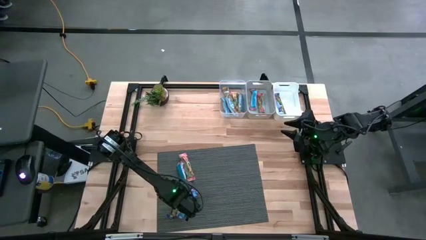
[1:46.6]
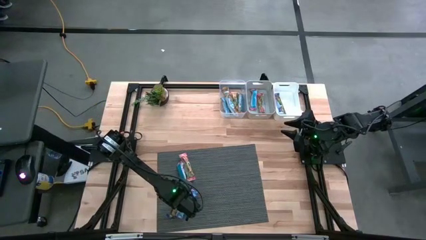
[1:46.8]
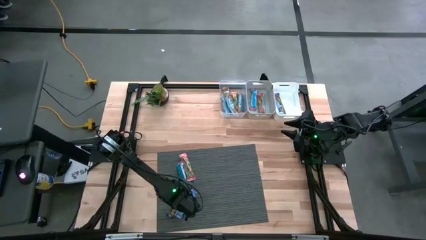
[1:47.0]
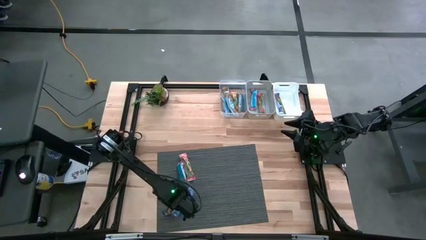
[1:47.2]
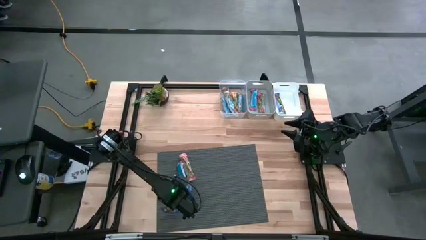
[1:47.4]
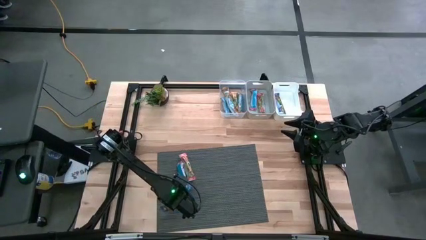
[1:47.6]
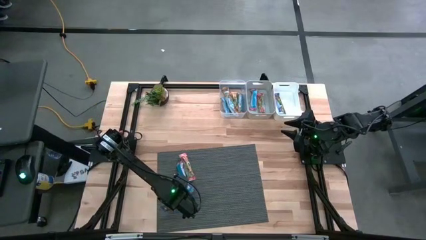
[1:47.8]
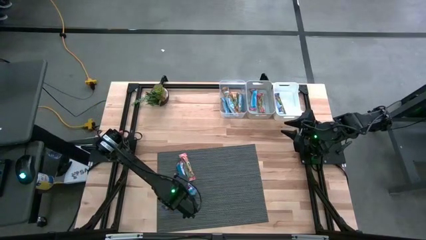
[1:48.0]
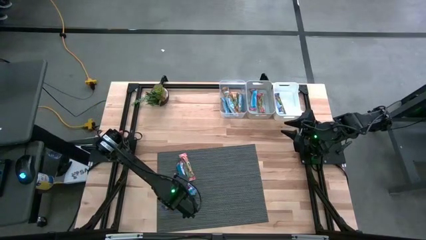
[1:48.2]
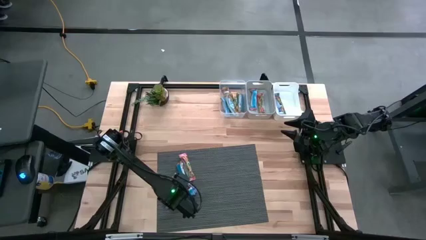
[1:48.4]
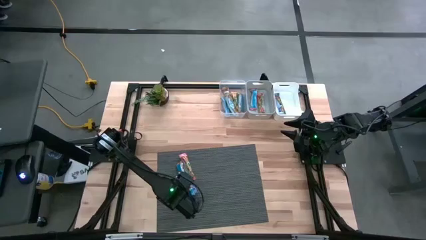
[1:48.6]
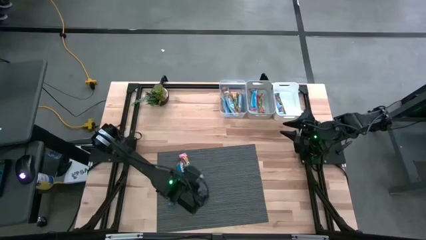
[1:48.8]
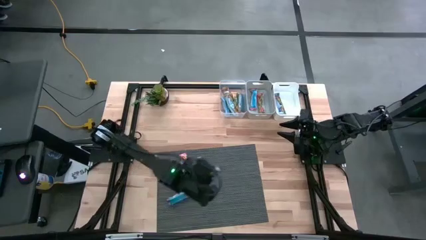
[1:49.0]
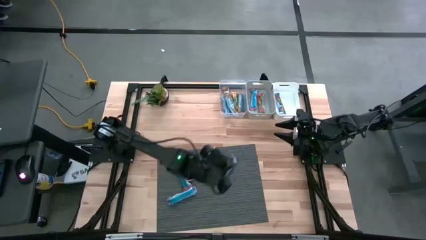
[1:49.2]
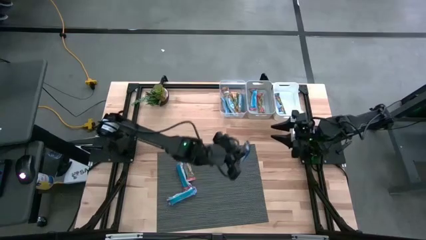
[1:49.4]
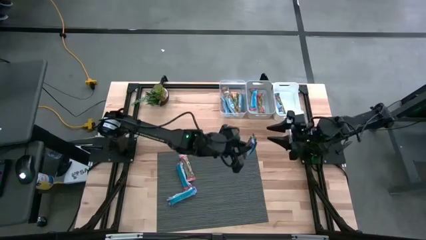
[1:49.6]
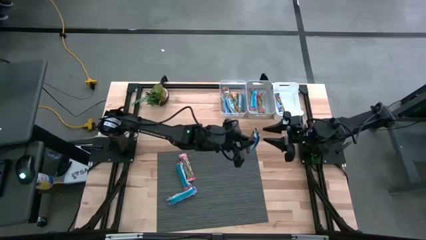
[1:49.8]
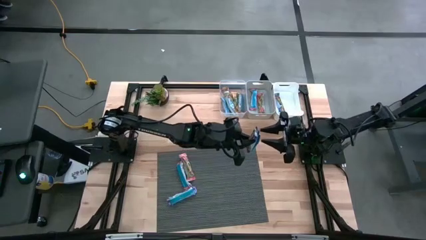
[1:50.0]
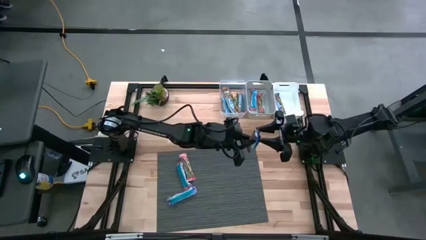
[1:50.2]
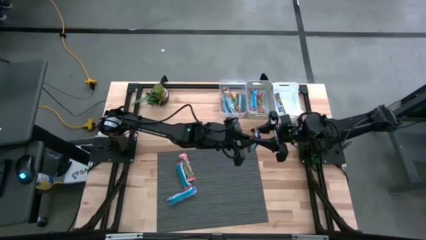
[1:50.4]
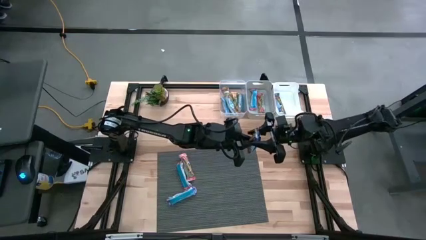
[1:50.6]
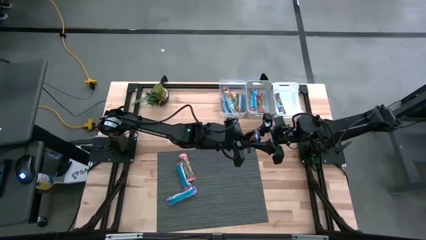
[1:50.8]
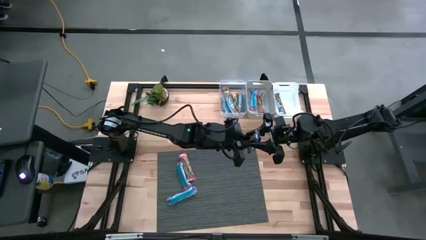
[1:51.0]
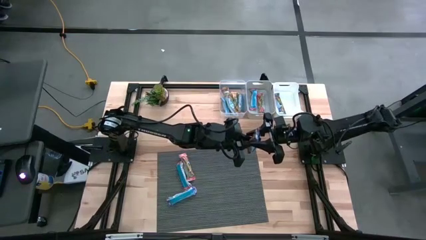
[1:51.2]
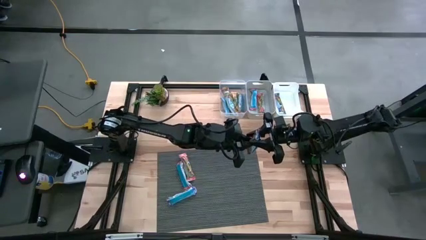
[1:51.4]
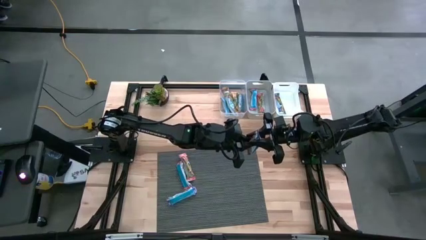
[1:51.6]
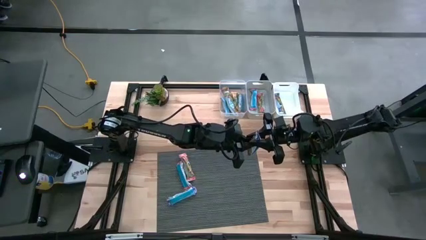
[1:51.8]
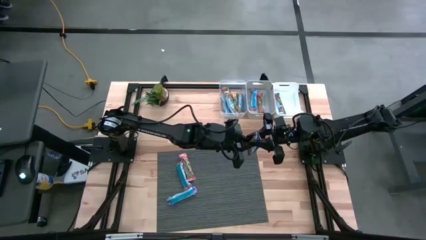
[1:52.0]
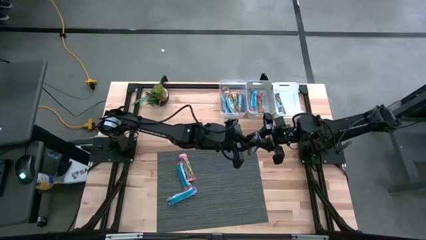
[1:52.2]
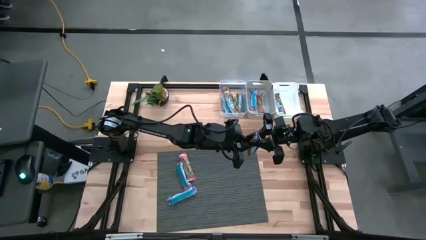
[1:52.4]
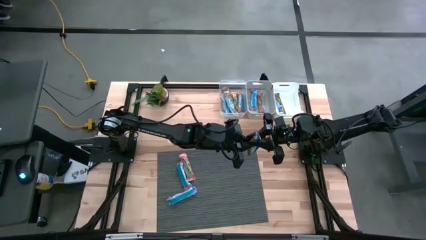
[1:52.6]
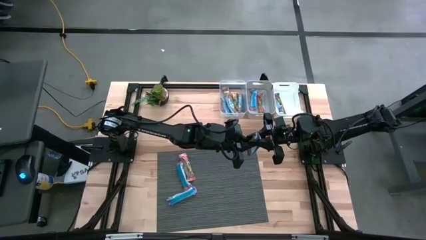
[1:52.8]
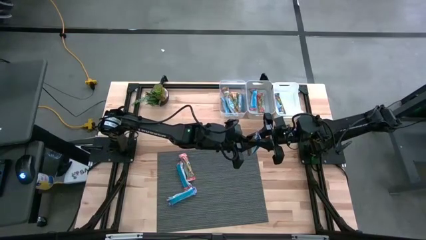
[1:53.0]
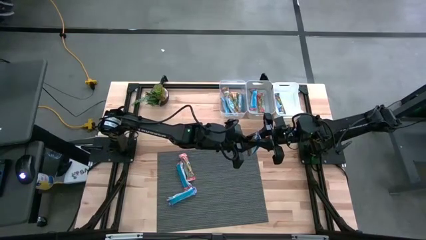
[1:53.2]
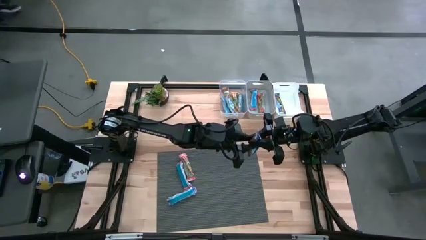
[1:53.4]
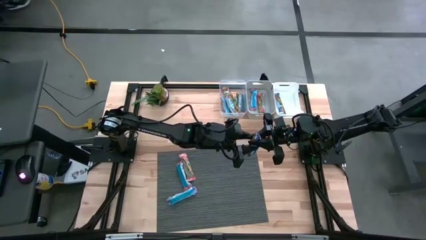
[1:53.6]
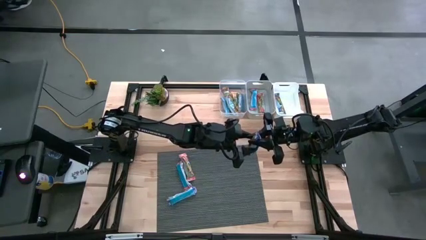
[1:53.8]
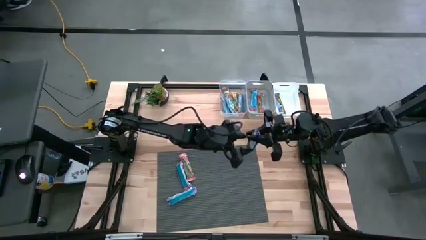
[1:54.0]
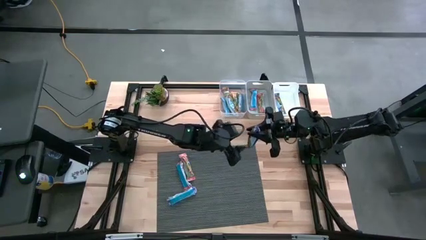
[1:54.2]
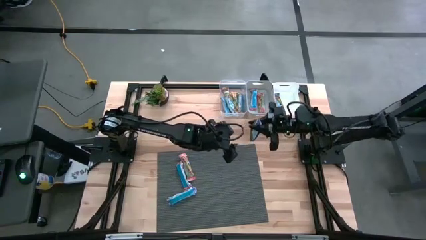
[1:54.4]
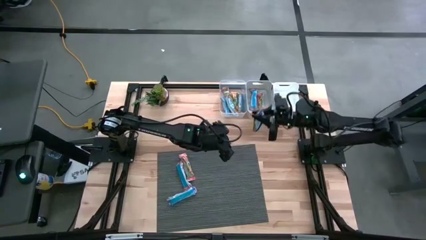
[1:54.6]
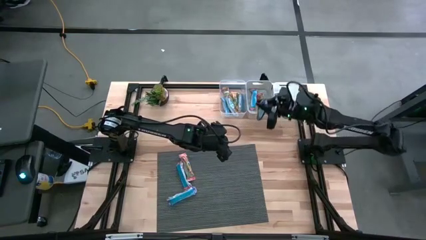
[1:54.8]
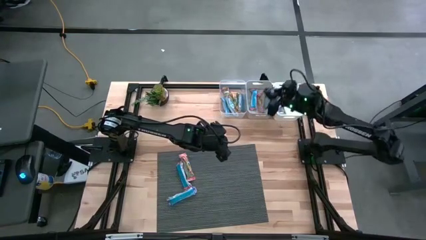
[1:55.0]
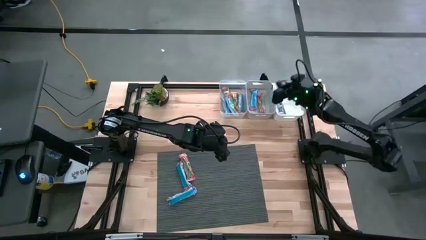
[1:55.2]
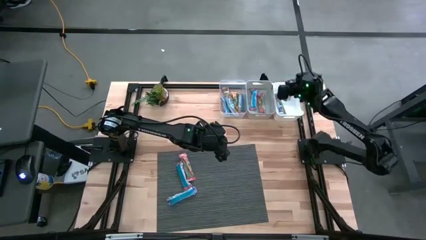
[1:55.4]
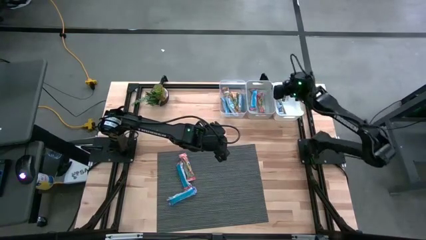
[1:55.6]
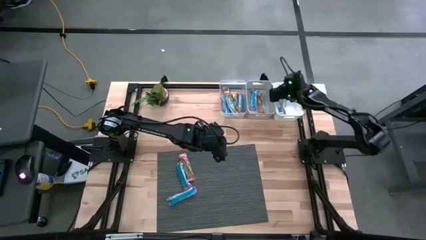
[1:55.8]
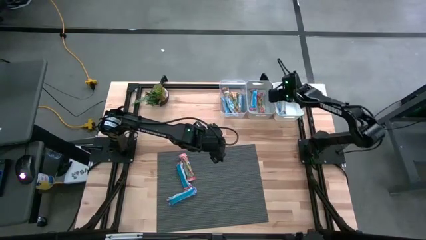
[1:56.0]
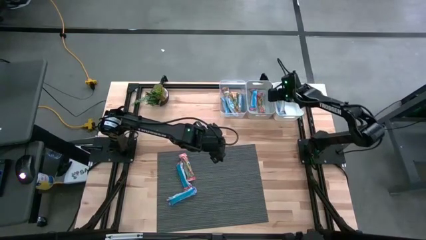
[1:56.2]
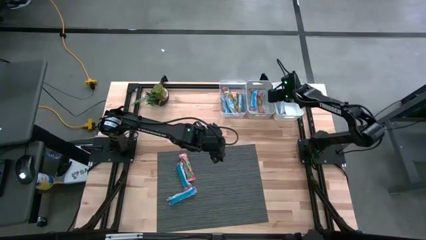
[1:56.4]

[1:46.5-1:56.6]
Task: Pick and place Granola Bars by type
Put the blue granola bar into the white bin

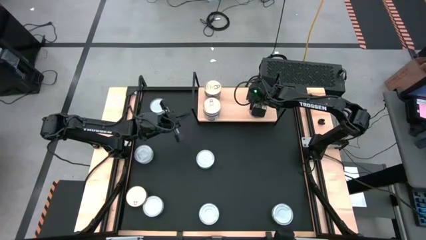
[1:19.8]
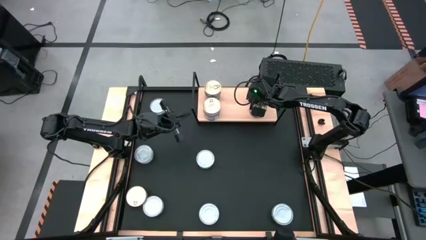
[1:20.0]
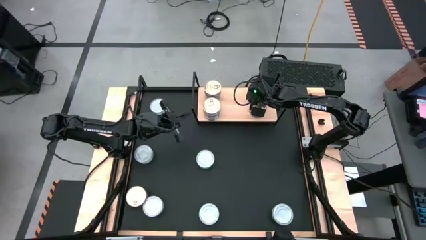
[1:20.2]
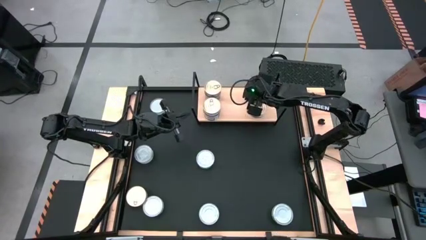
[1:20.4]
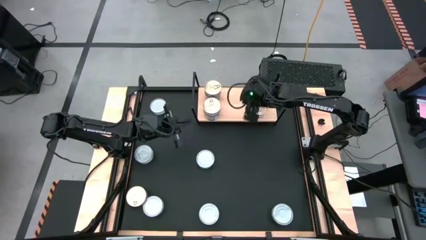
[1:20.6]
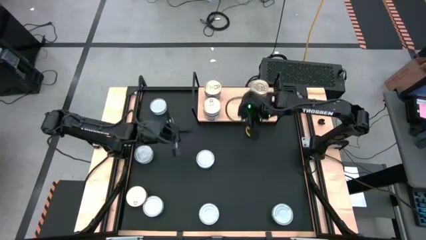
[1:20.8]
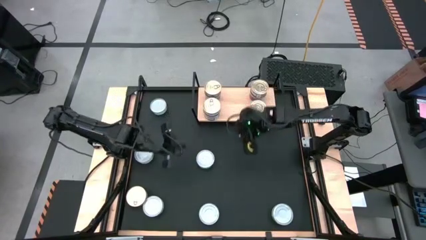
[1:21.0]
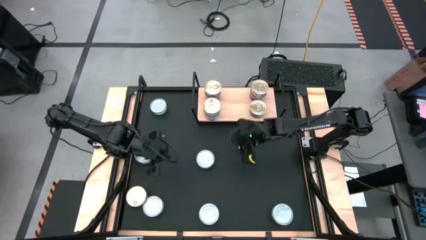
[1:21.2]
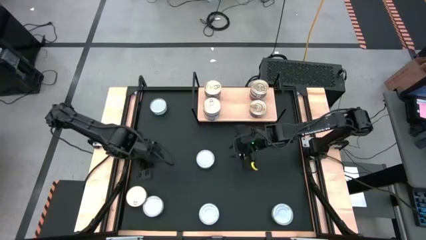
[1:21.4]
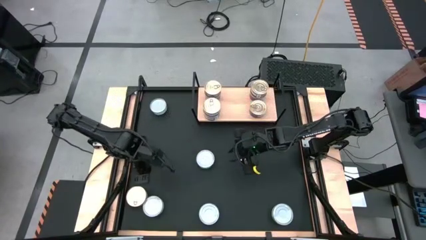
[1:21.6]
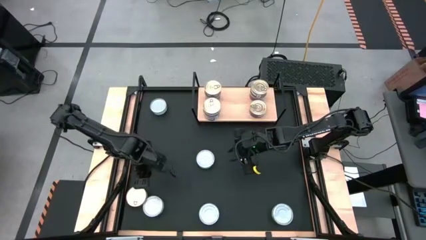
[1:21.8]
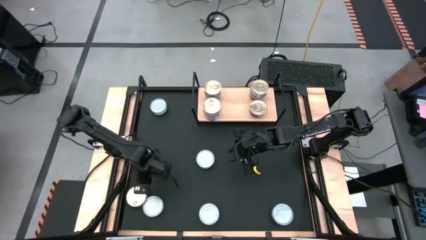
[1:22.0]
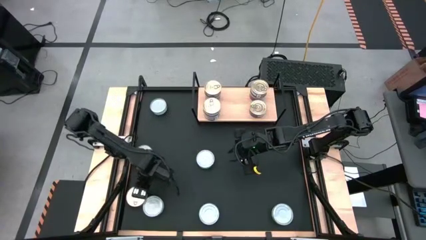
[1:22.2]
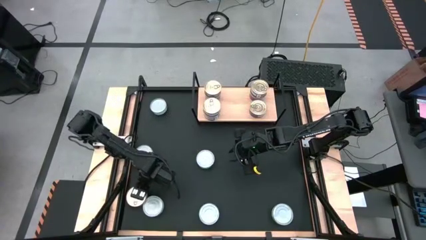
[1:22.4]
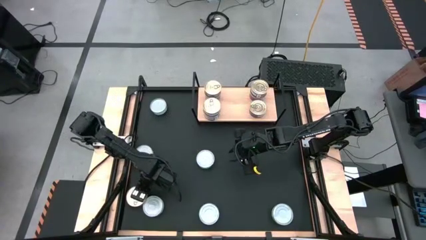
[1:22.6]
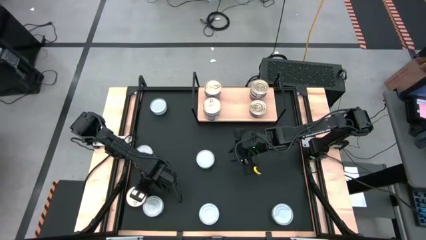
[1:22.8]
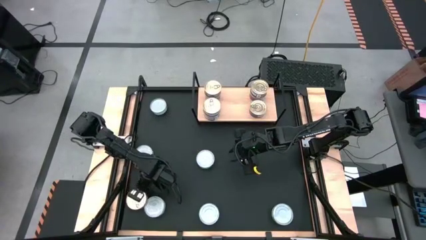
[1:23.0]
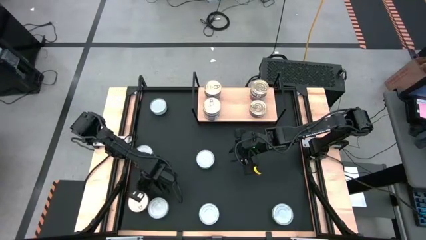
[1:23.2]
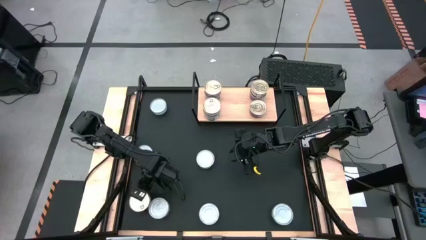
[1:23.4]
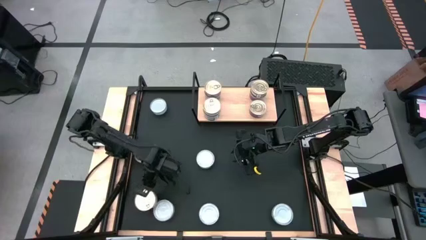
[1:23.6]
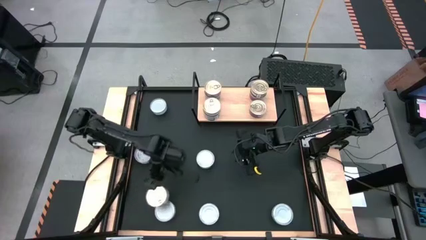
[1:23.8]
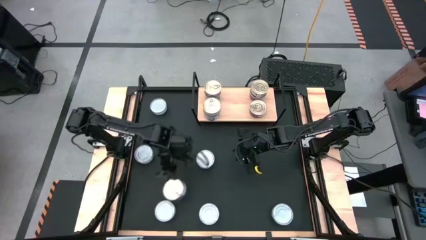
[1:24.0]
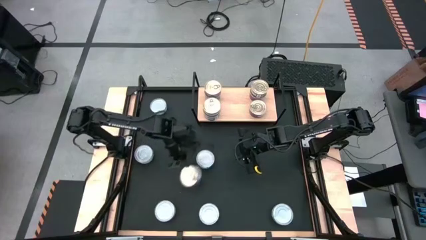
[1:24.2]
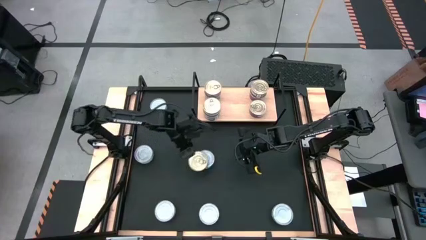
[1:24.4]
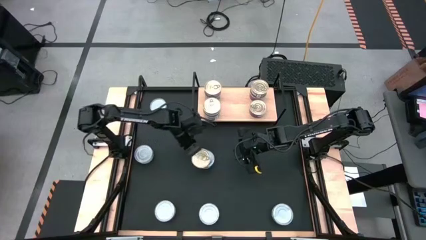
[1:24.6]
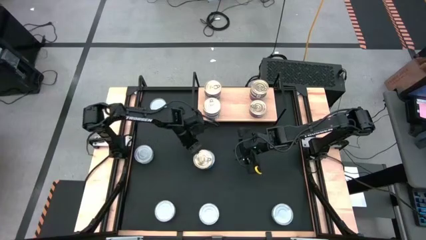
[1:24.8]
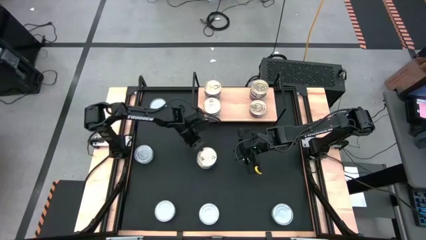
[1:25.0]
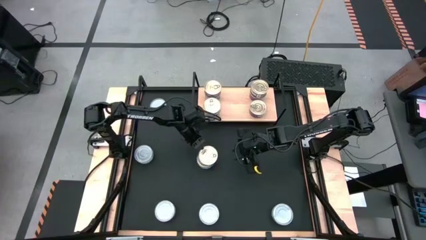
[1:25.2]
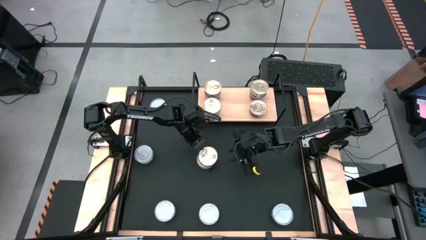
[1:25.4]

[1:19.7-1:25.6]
Task: Stack canned seafood by type on shelf
Stack the blue pink tuna can on top of the other blue pink tuna can on the shelf

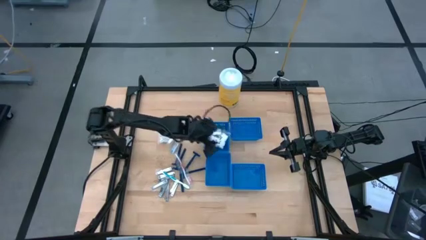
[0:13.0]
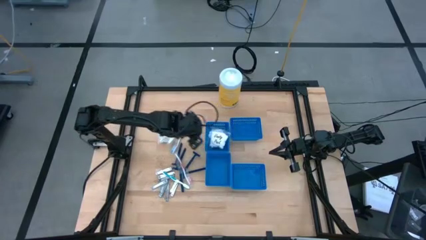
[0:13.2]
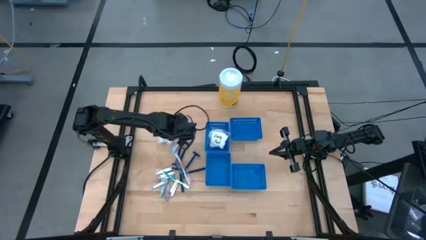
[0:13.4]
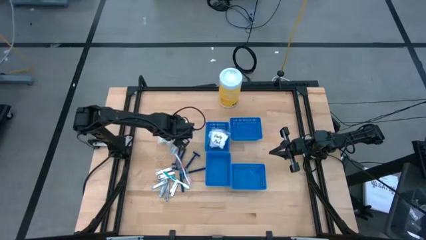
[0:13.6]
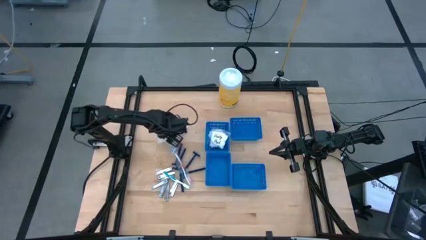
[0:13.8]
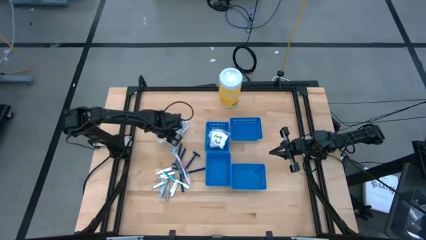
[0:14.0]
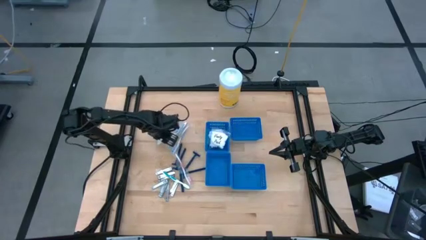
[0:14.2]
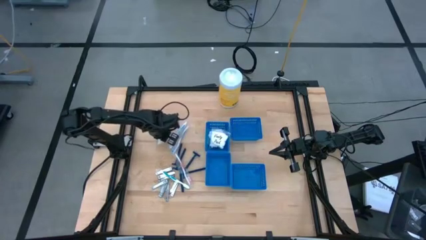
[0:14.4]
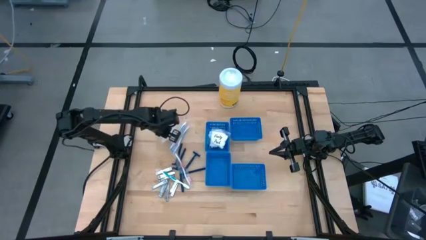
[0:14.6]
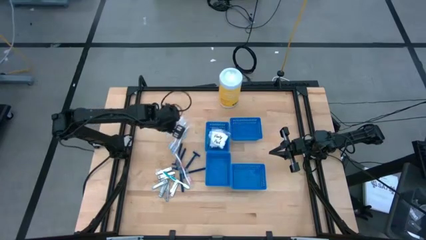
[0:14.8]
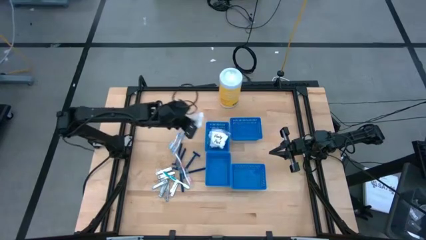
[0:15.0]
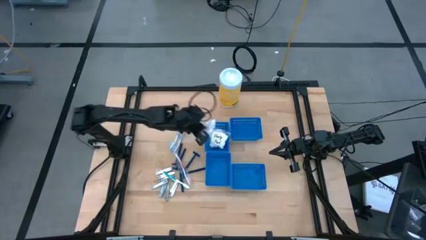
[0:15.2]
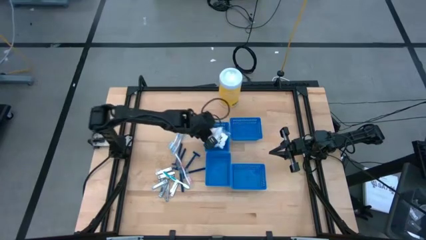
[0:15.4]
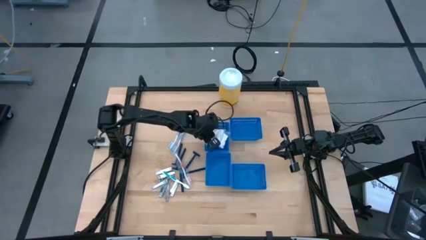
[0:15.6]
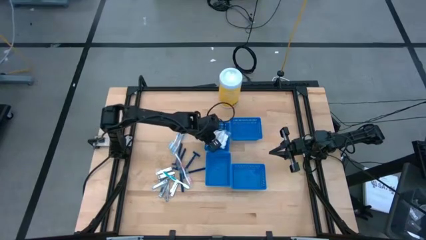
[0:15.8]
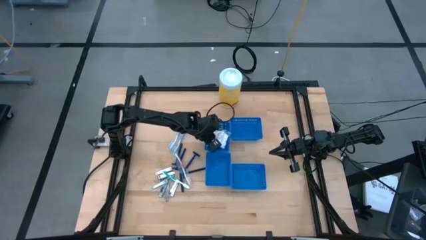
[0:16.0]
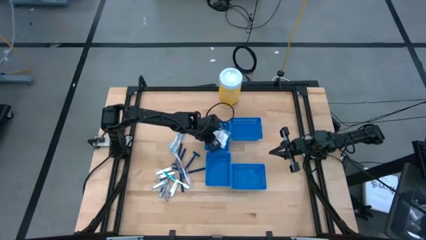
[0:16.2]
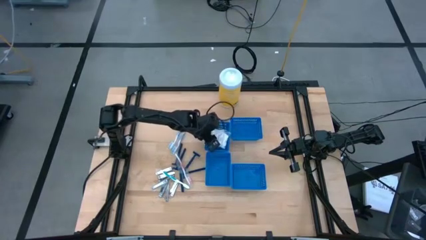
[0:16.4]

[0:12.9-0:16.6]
Task: Pick & Place Travel size toiletries
Put the transparent cotton pack on the top left blue bin
